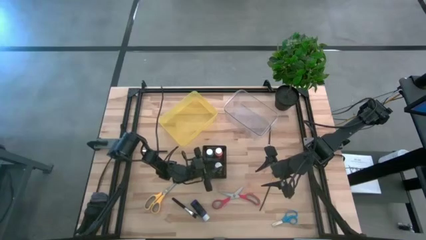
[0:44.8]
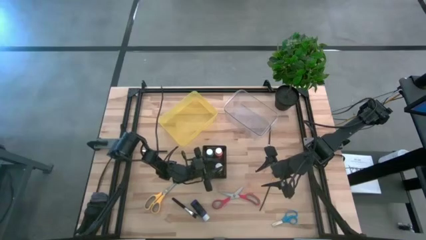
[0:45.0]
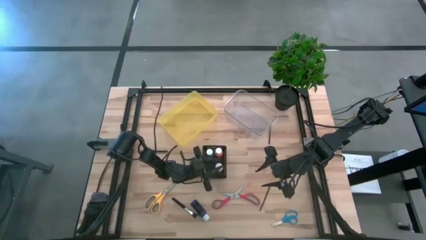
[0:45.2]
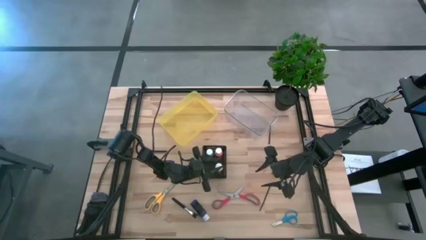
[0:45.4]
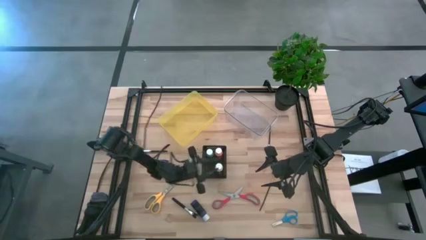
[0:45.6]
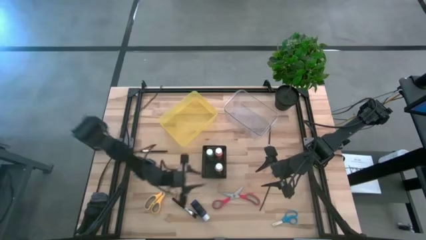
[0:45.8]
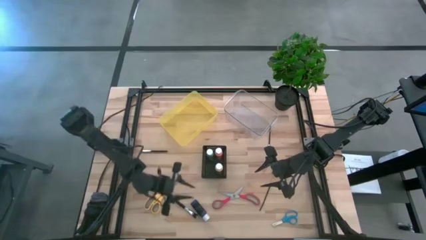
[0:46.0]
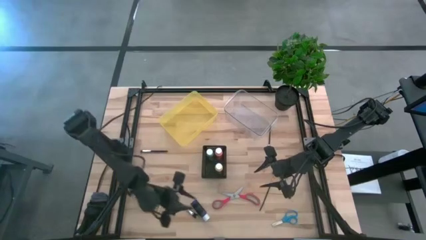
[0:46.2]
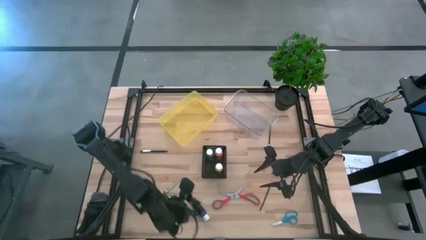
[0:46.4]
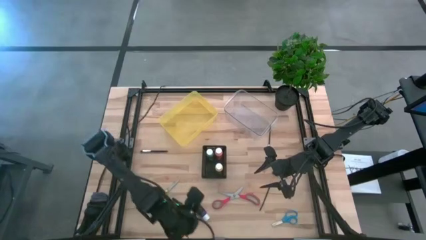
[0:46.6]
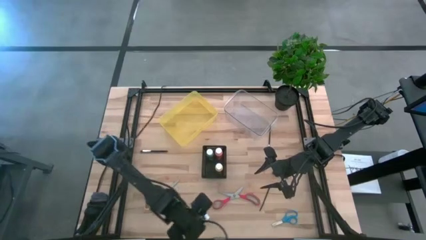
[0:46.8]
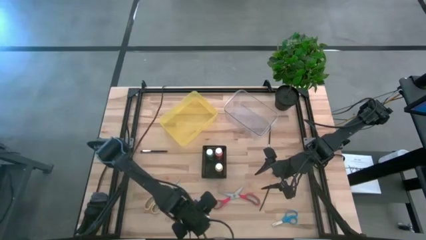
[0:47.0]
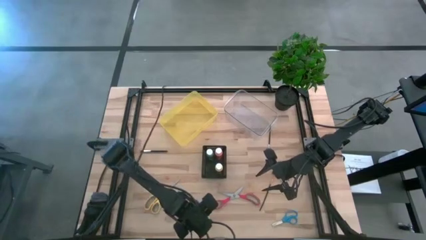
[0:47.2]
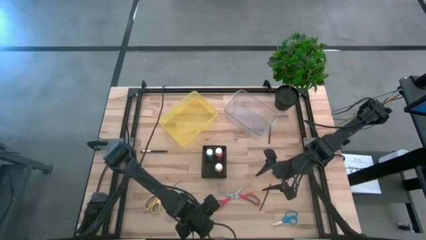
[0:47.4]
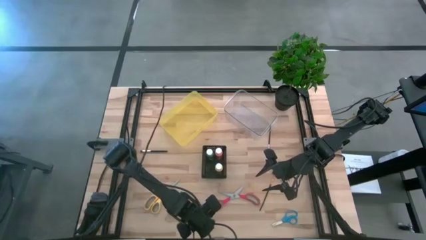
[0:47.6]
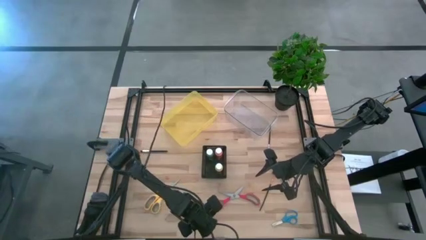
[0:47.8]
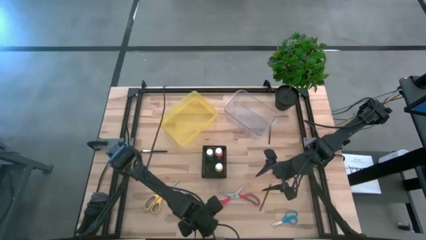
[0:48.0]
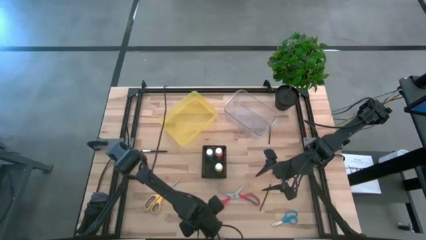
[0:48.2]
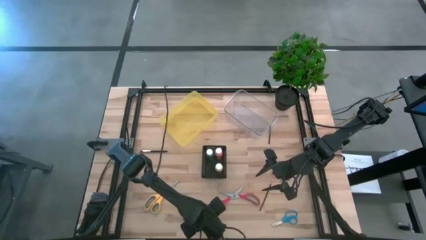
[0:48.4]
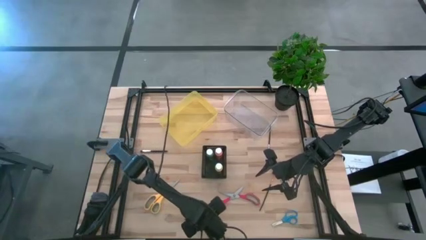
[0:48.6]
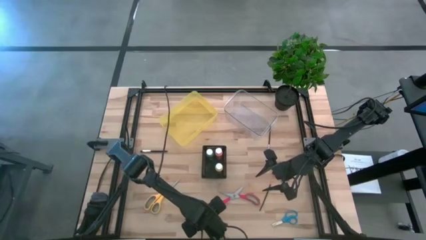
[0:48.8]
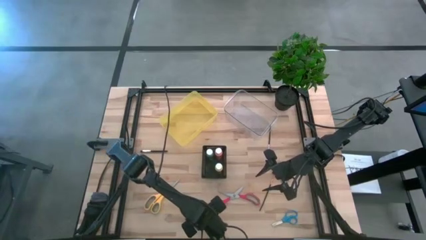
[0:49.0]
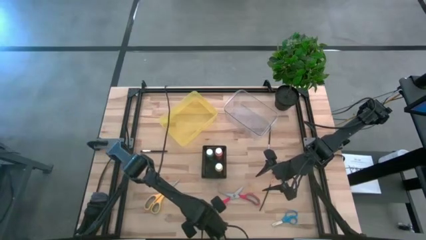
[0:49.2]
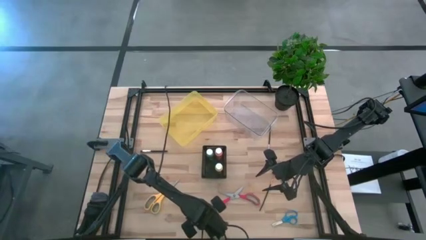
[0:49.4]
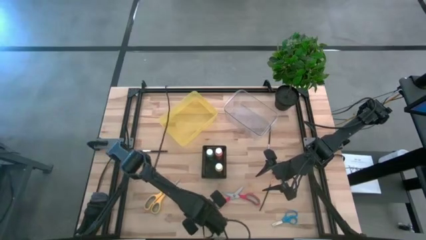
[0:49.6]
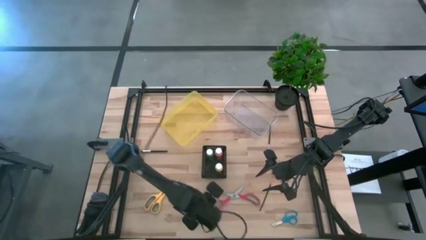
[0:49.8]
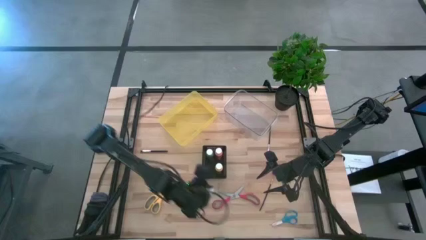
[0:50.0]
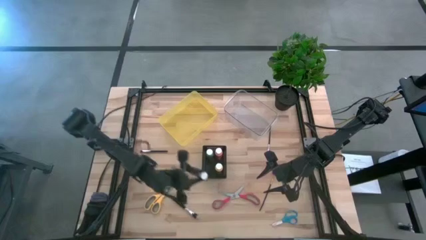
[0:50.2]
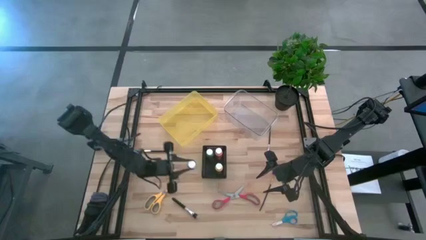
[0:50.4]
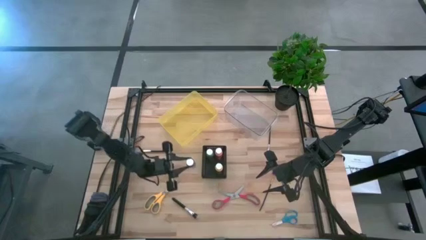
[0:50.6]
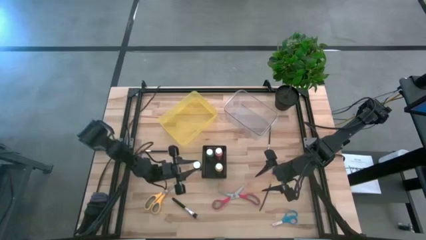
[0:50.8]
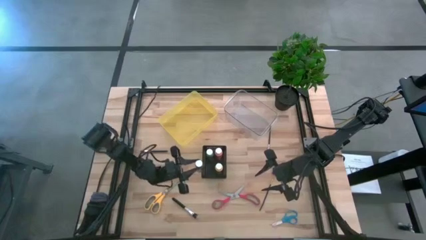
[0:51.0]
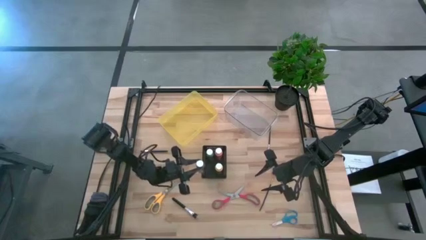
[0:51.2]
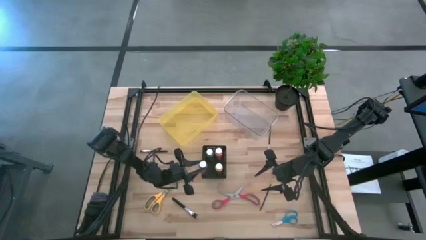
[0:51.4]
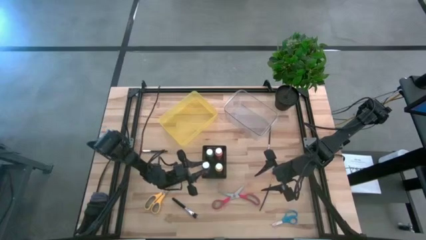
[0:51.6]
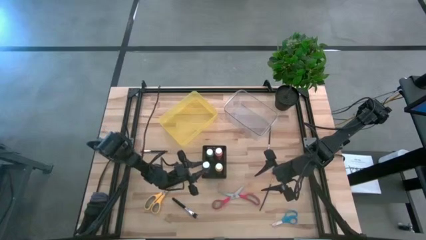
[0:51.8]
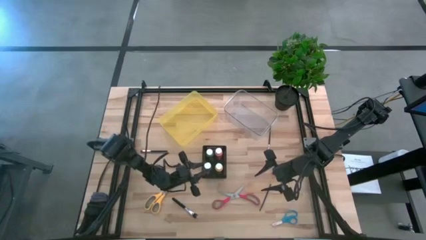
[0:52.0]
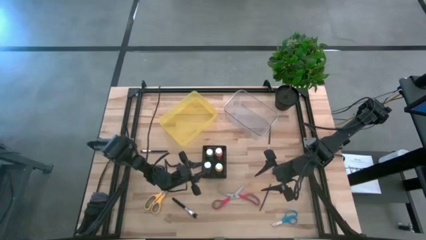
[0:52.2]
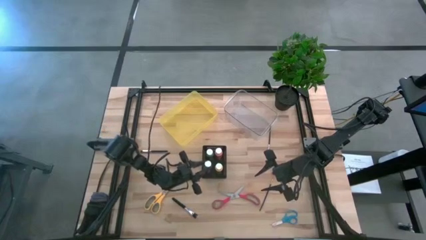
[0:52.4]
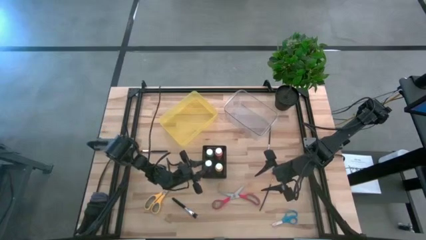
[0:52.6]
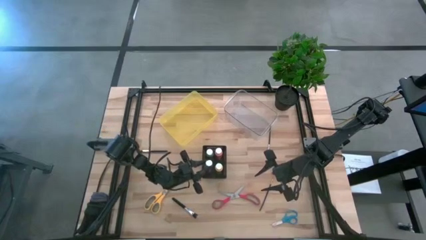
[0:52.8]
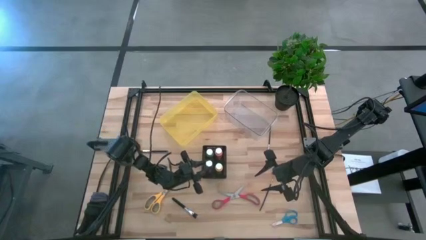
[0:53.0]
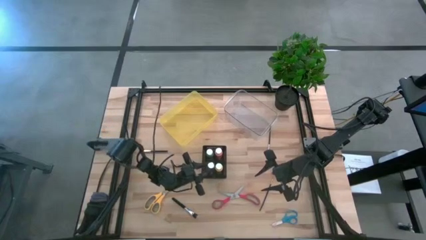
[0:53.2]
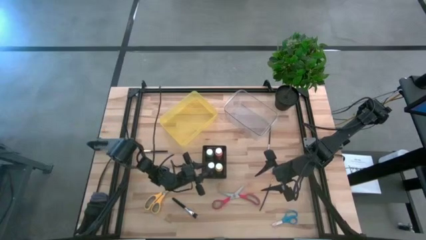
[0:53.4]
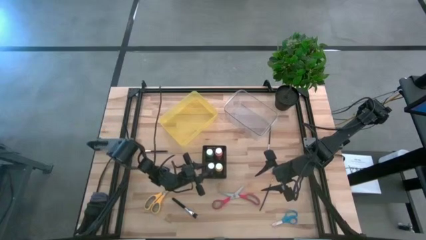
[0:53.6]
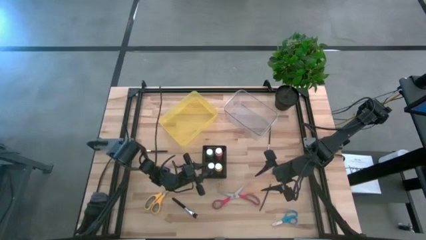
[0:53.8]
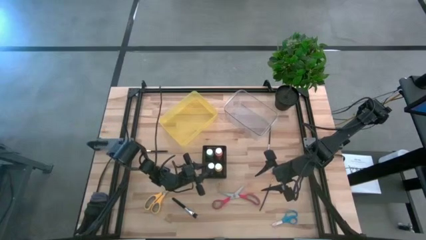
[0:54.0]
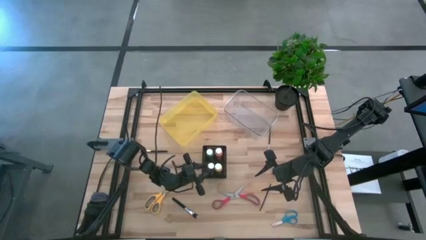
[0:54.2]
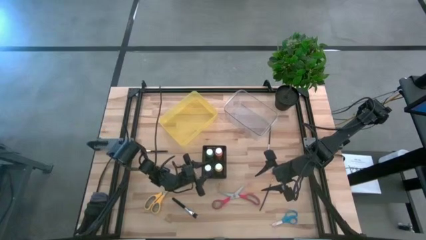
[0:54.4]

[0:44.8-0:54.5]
Task: Pick & Place Paint Supplies
Put the blue paint bottle into the black bin

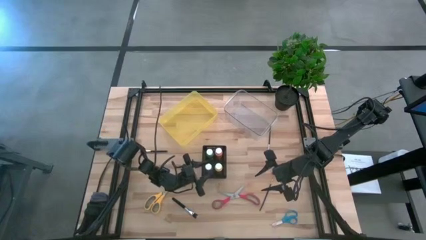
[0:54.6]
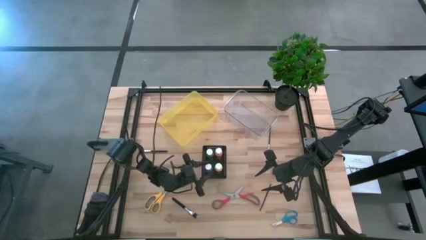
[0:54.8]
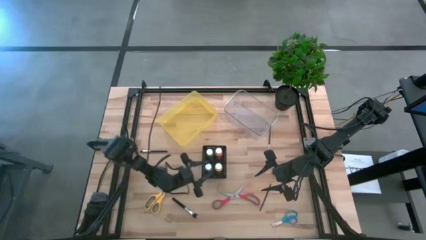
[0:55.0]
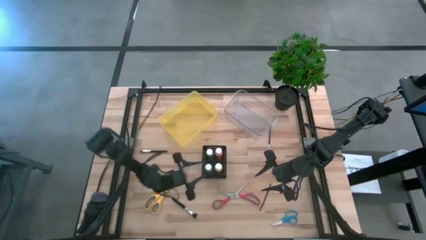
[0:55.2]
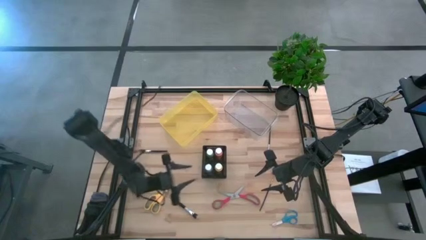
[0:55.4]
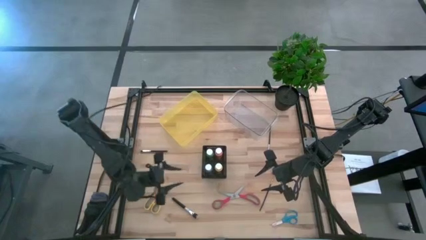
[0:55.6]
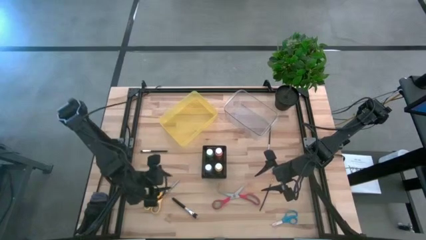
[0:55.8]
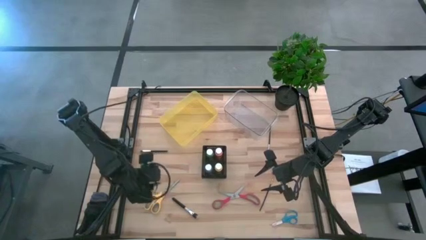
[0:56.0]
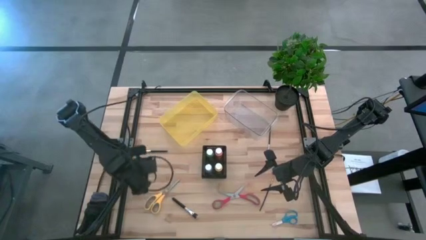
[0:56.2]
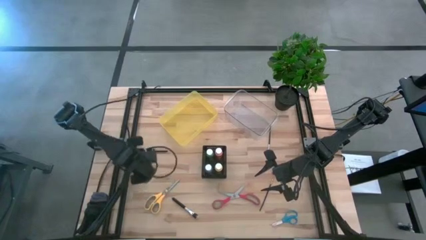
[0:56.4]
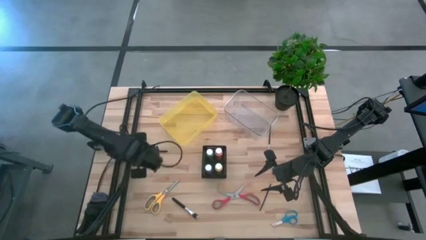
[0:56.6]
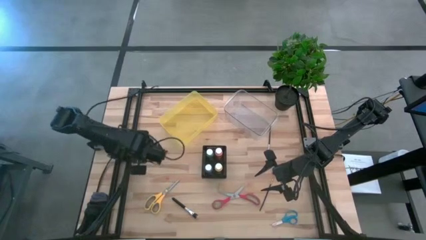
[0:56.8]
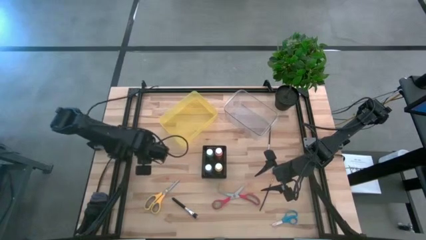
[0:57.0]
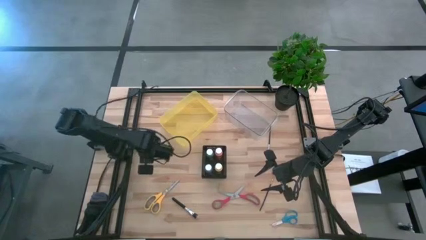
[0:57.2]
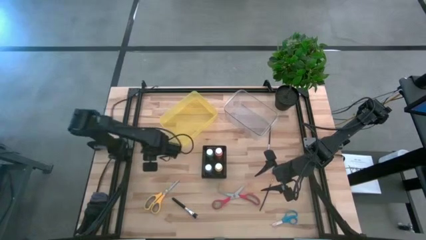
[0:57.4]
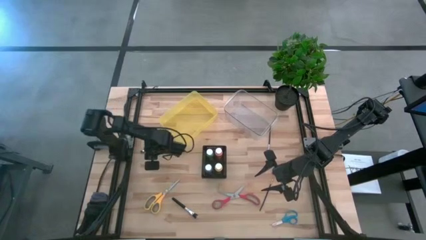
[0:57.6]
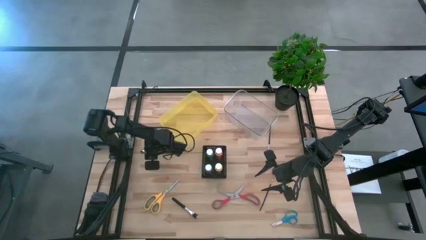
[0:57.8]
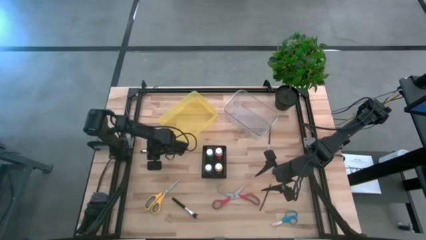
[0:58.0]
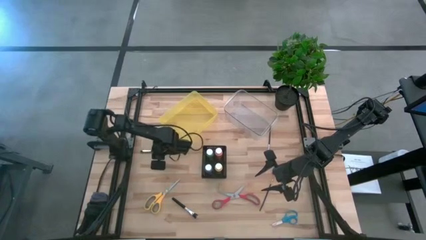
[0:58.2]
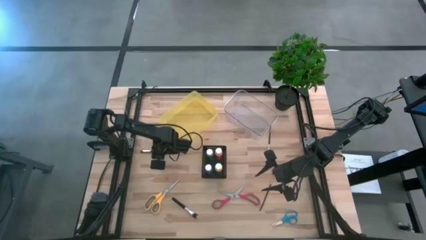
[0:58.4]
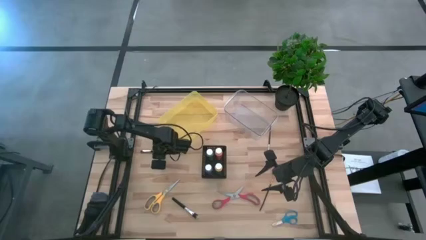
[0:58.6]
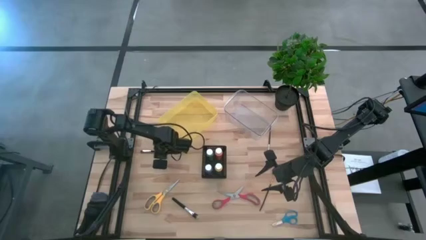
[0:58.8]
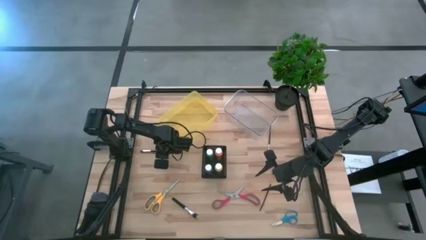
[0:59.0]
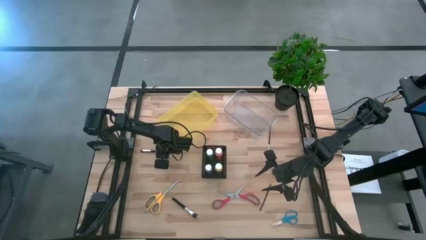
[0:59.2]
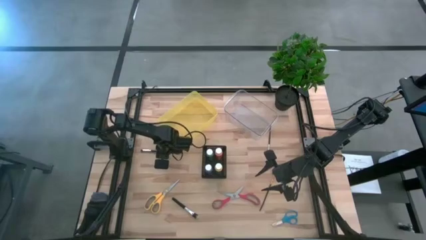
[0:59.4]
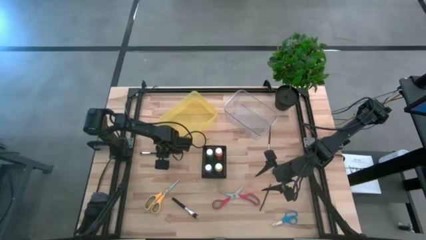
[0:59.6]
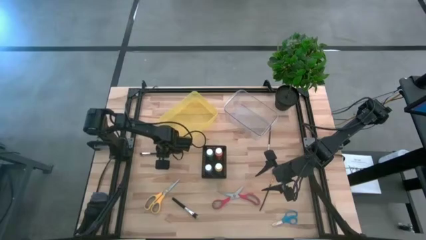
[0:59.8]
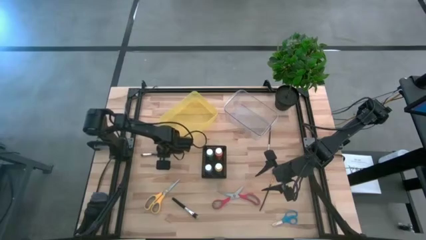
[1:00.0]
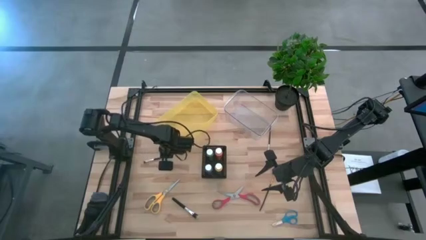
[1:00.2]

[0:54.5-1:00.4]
Put the left black eyeshadow brush into the yellow bin
